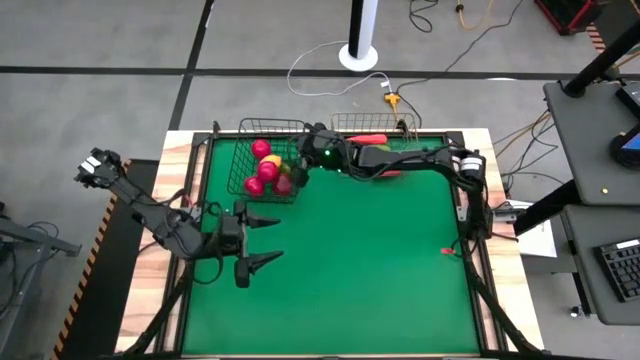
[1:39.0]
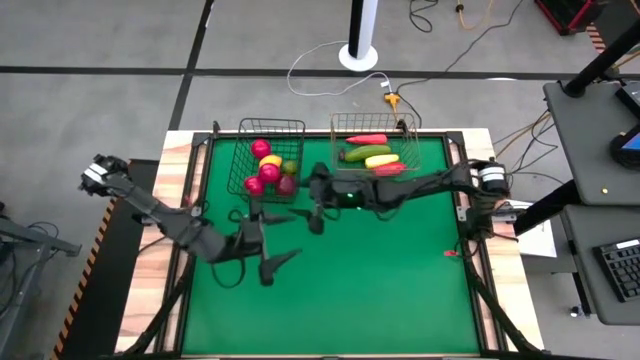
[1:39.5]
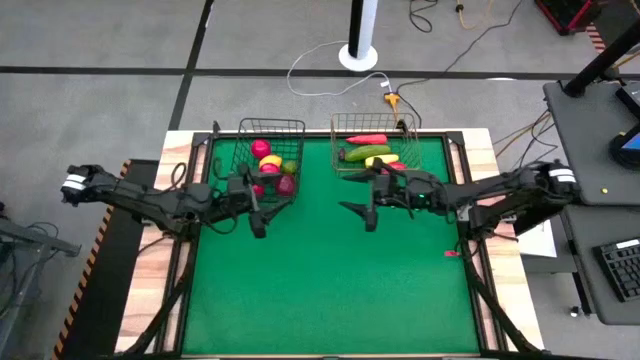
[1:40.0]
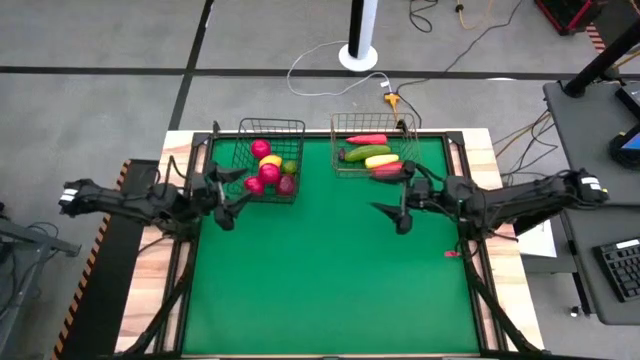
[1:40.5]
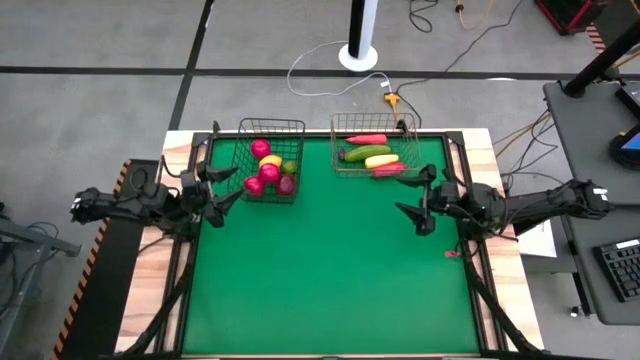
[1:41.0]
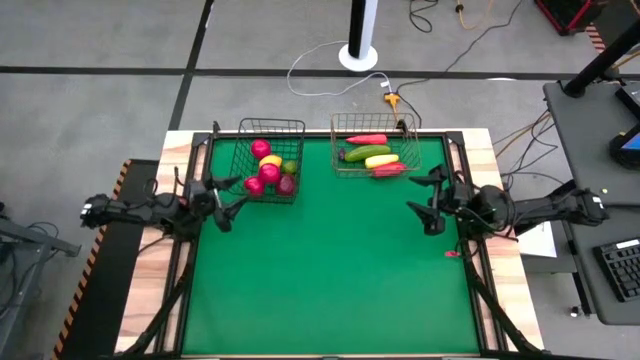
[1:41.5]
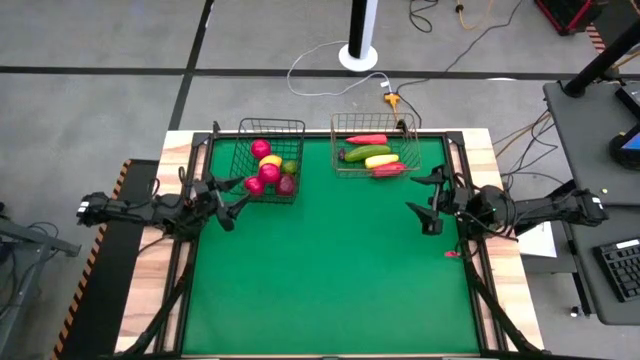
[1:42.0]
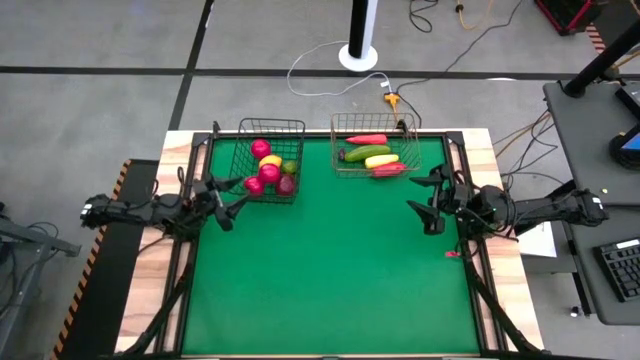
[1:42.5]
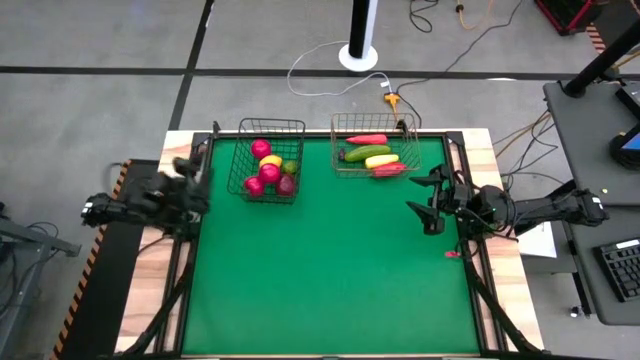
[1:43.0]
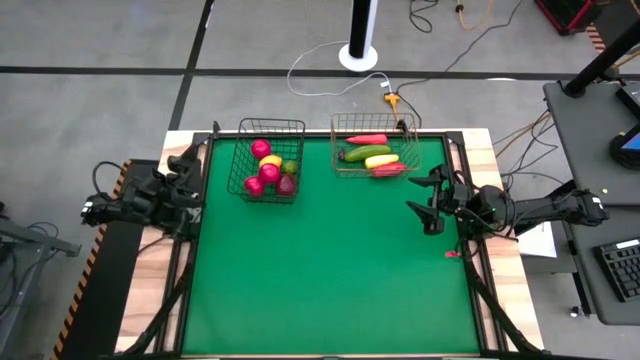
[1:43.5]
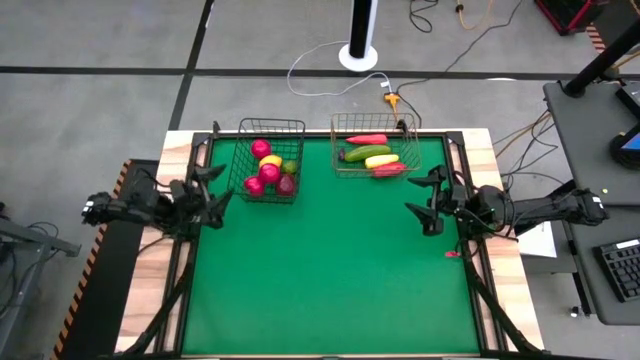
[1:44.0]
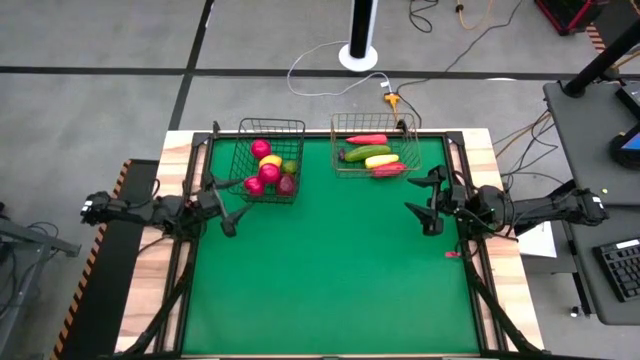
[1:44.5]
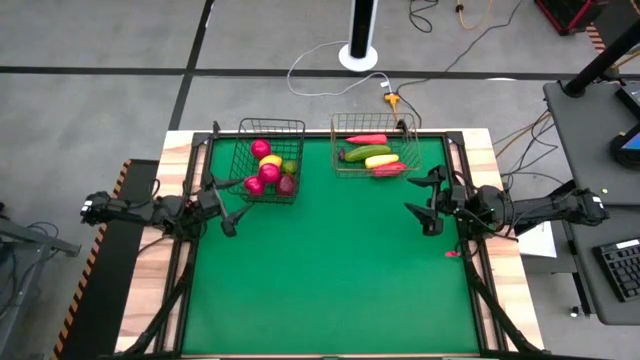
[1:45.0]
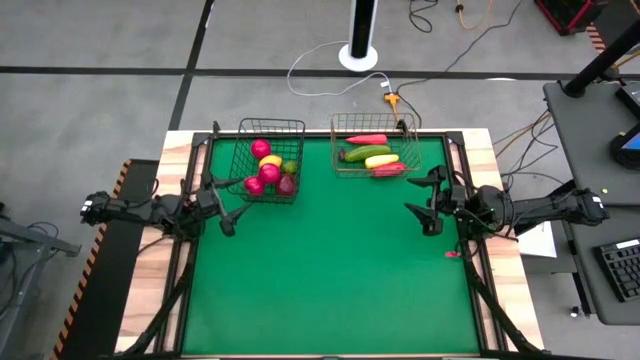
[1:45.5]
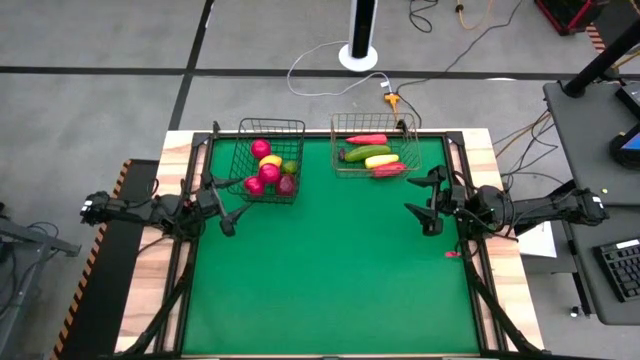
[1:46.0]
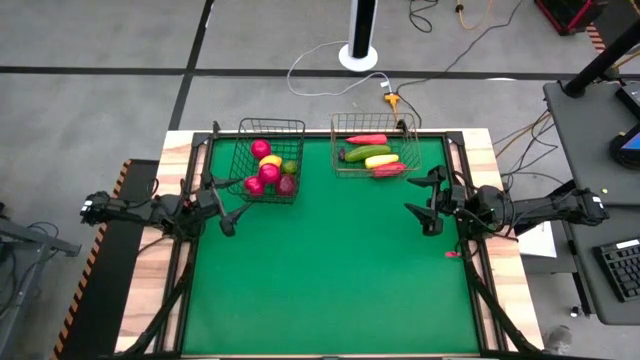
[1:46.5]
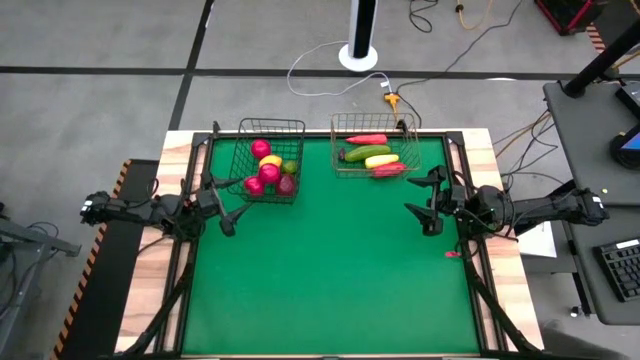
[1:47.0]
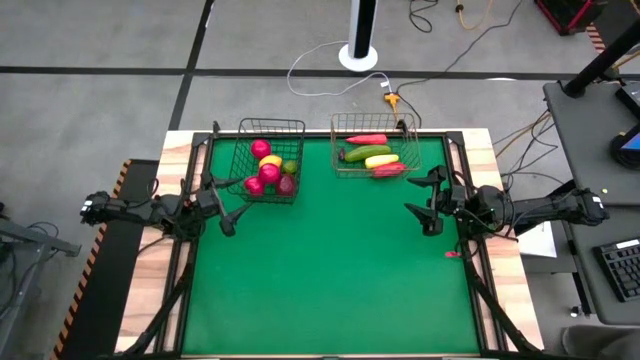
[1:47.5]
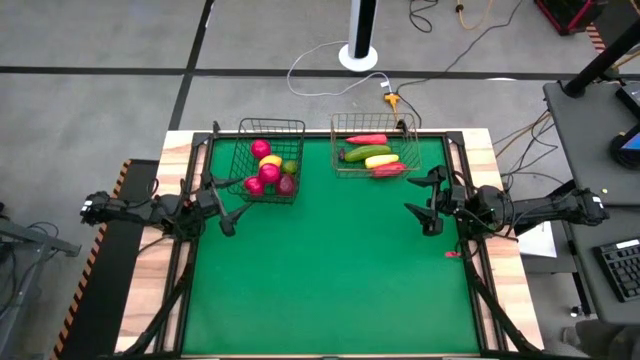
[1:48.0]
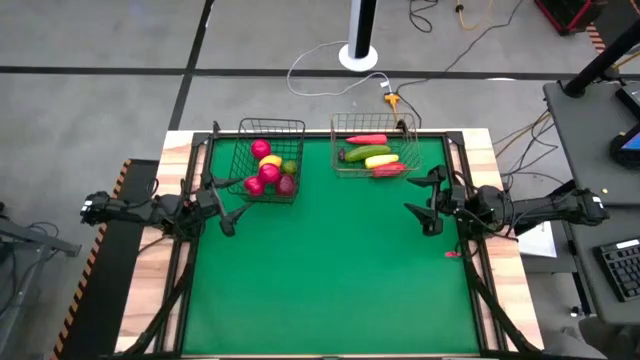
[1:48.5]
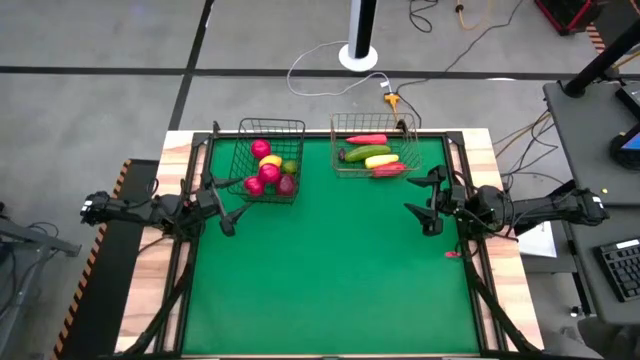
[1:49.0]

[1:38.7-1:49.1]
Task: Sort produce into baskets
Return to Home Position
